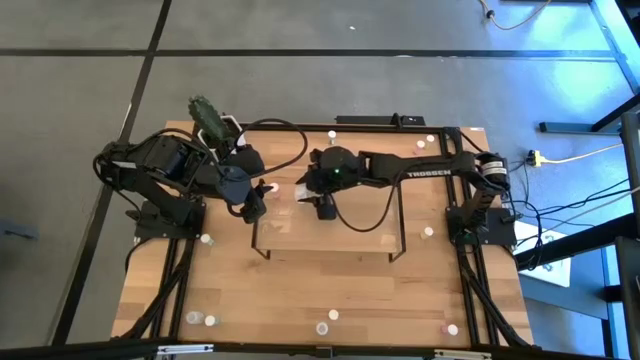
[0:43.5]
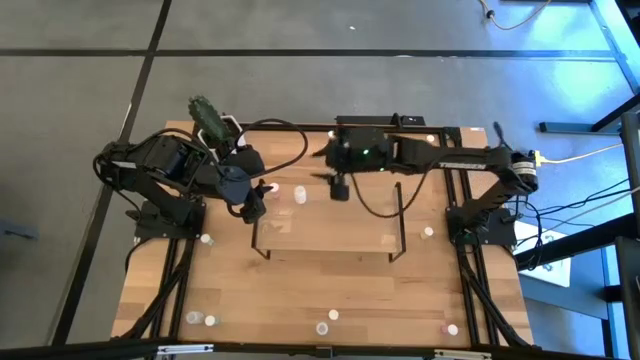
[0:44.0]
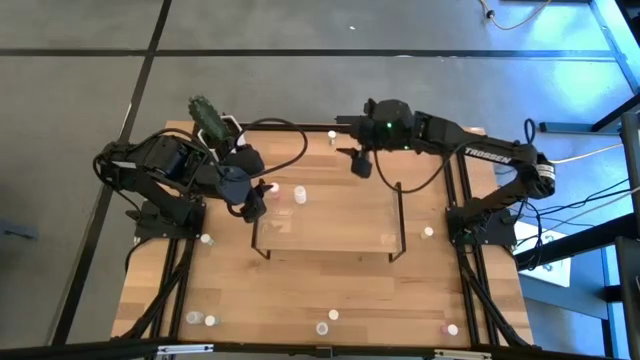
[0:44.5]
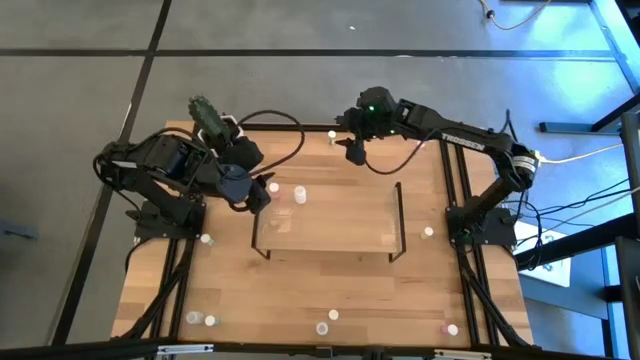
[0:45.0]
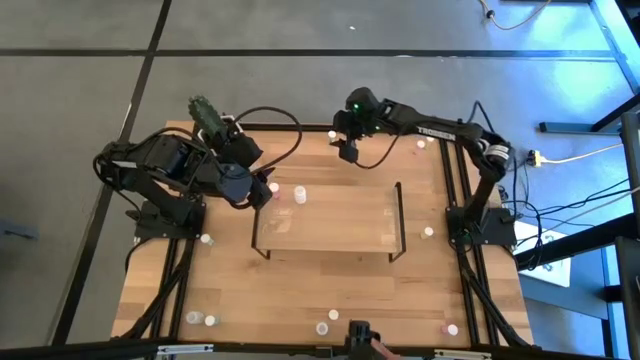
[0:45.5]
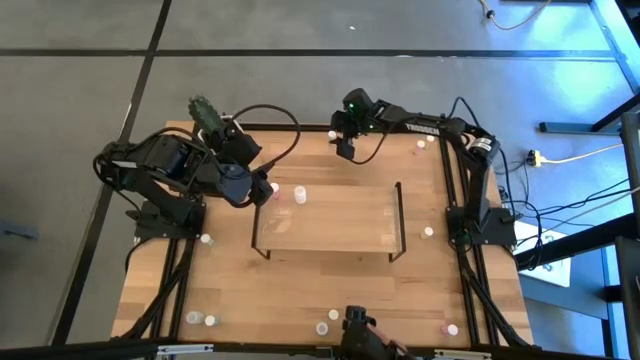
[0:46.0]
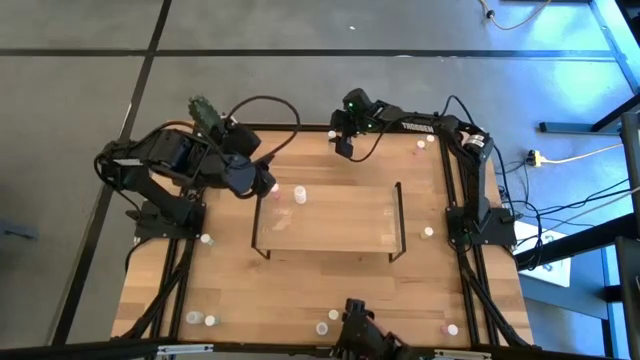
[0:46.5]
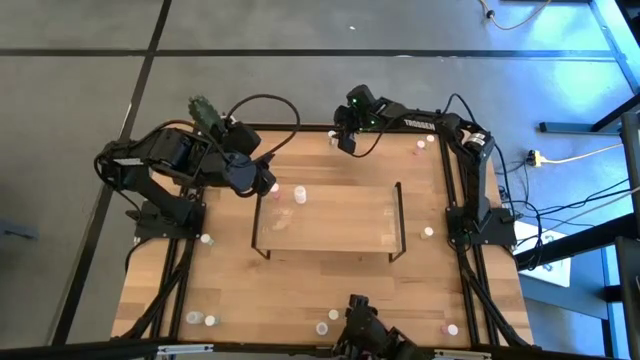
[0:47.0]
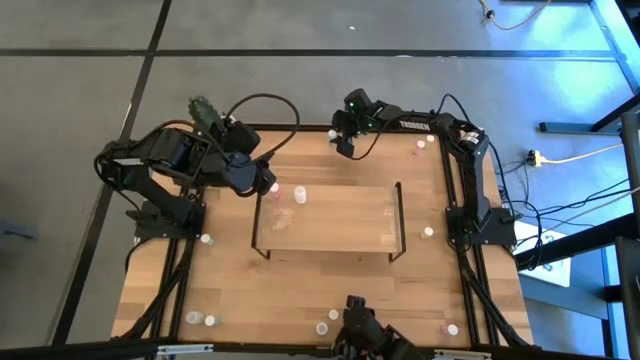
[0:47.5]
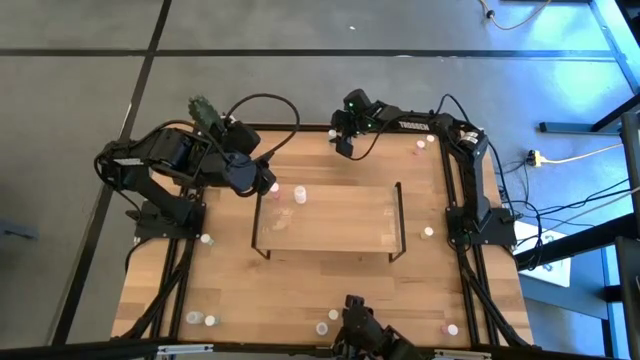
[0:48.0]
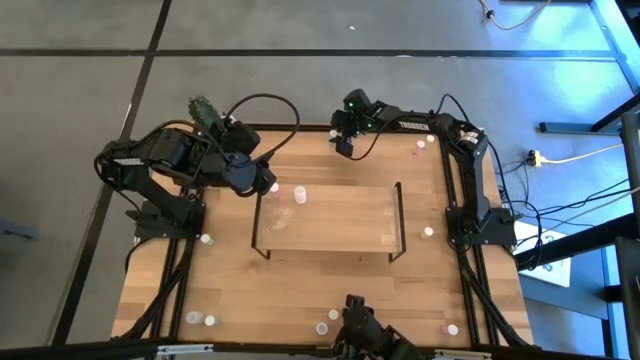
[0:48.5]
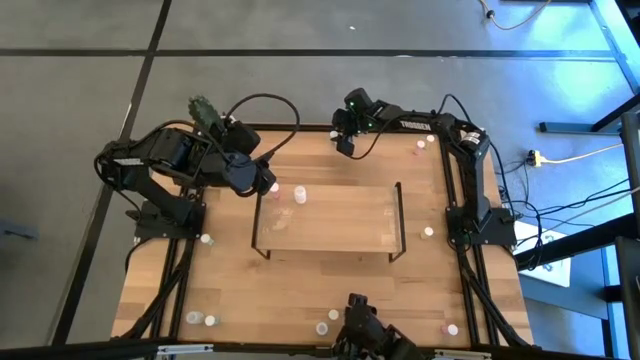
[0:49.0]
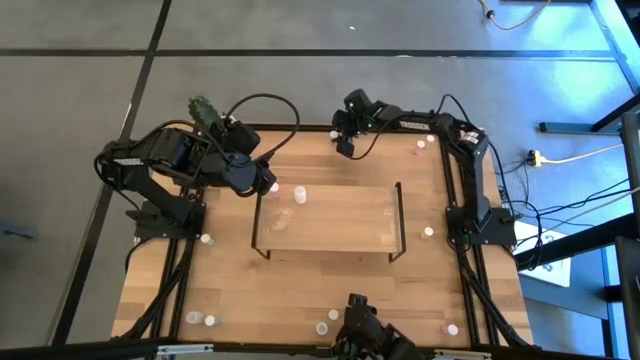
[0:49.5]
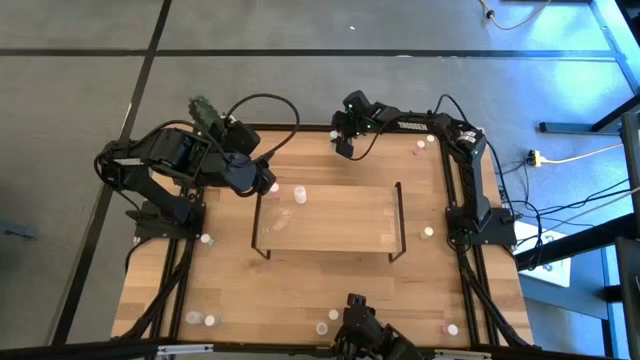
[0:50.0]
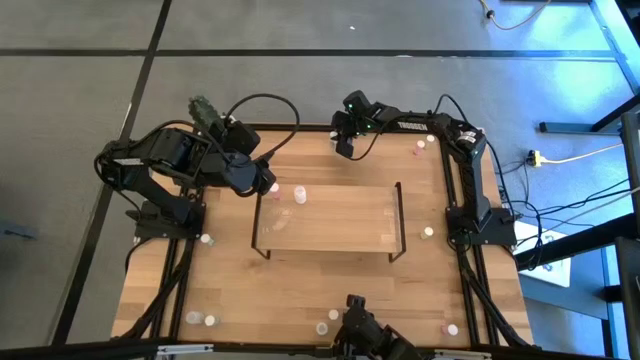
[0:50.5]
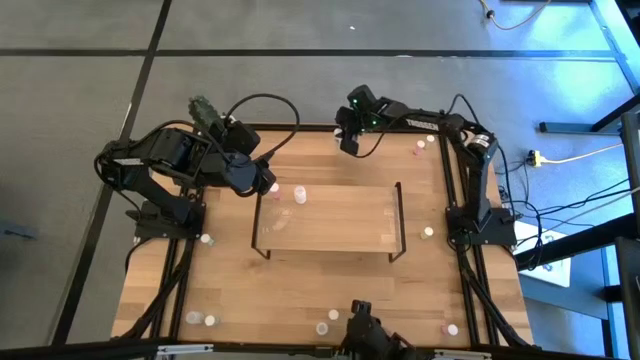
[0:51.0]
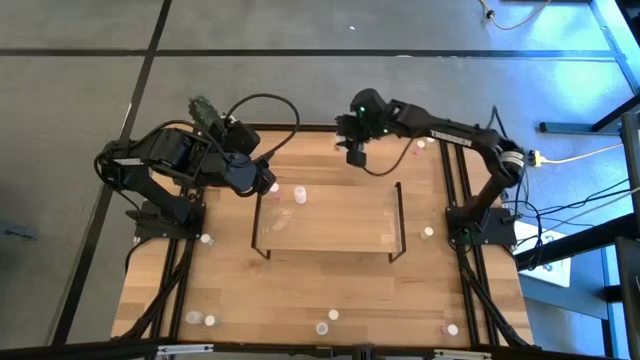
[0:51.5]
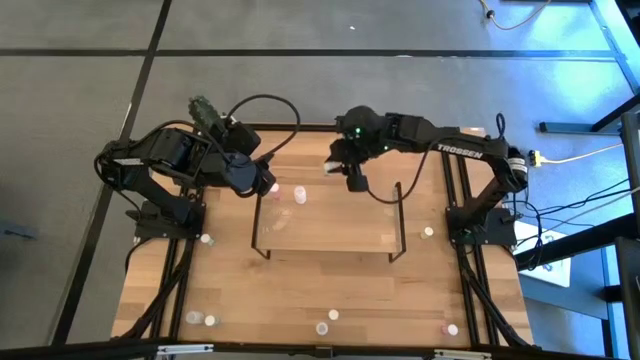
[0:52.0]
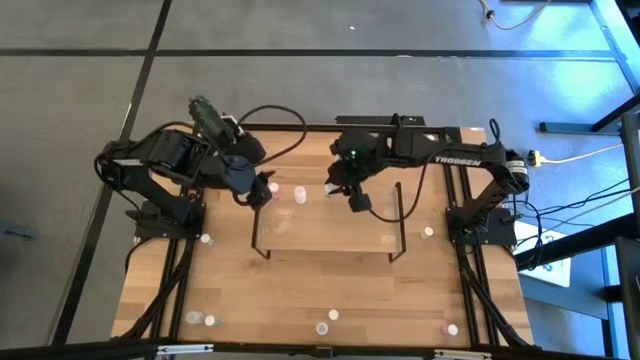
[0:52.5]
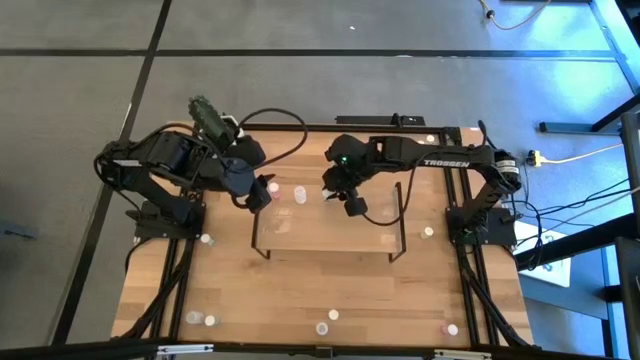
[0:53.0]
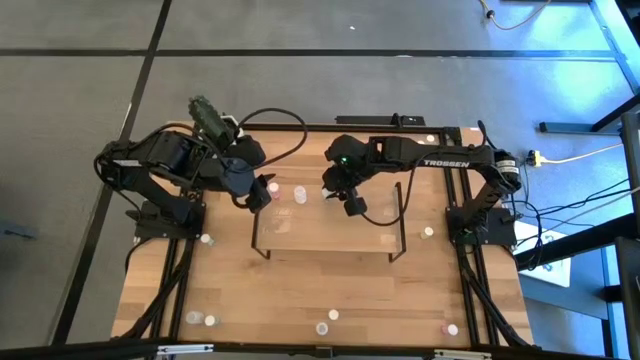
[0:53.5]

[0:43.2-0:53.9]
Task: Pick and place medicine bottles onto shelf by color
Put the top blue pill bottle on the shelf

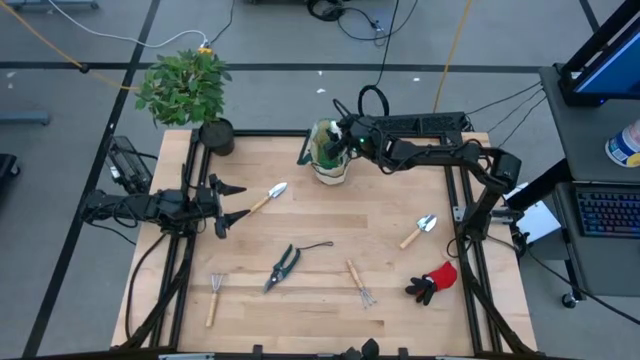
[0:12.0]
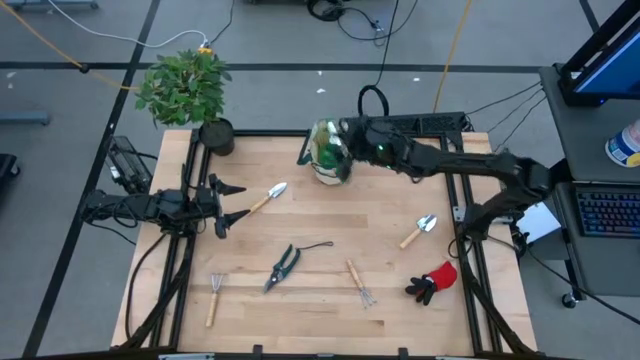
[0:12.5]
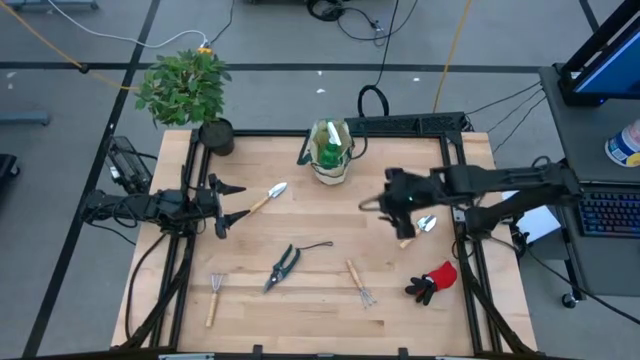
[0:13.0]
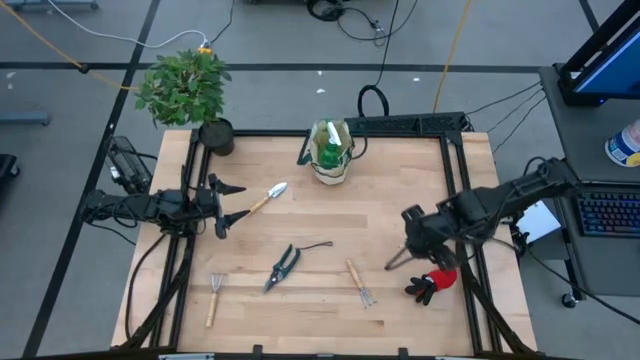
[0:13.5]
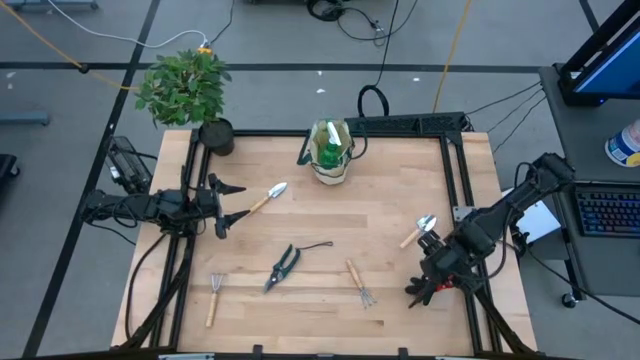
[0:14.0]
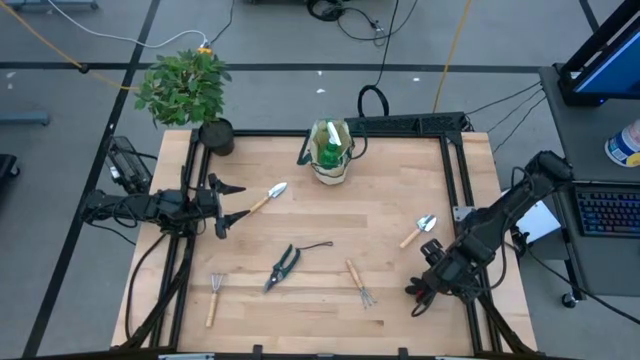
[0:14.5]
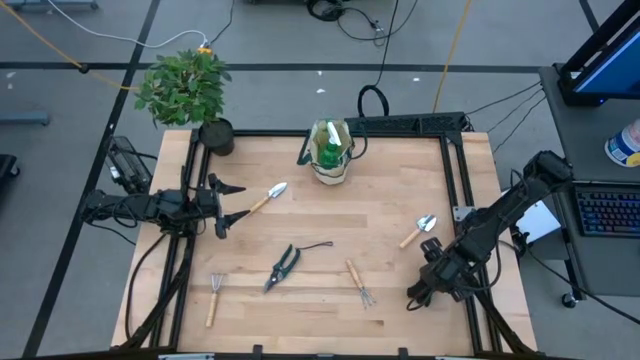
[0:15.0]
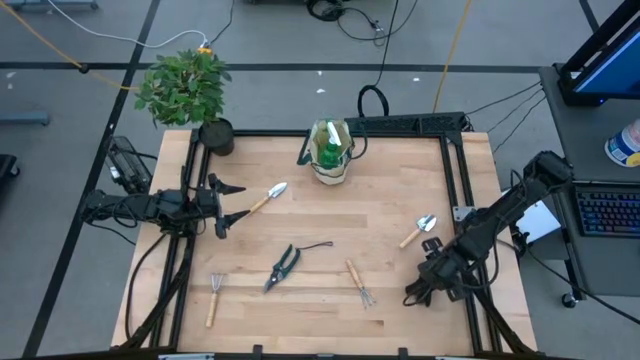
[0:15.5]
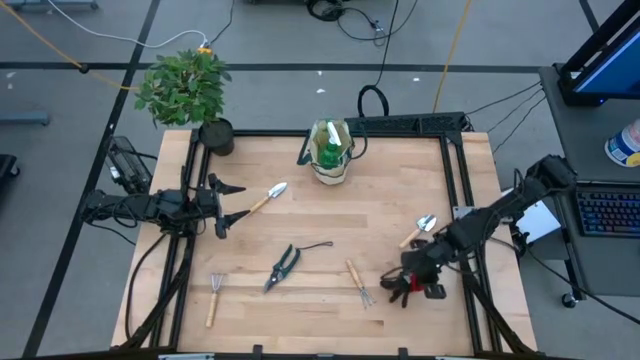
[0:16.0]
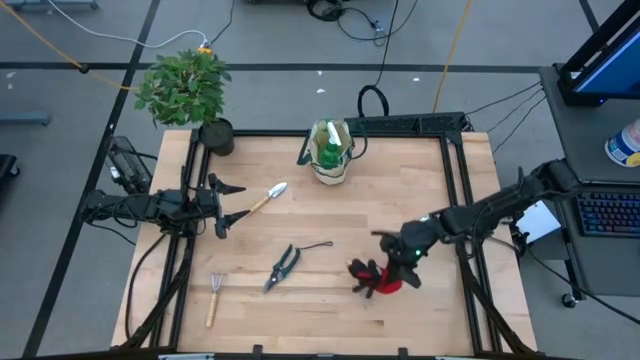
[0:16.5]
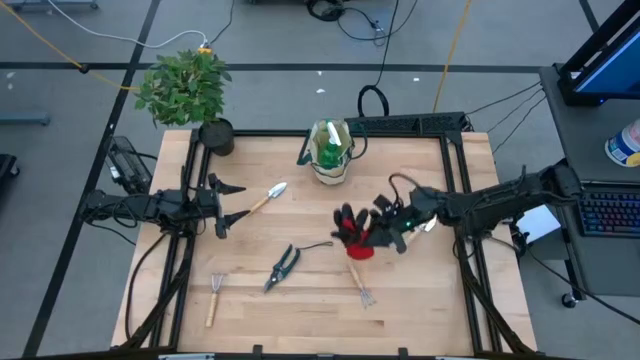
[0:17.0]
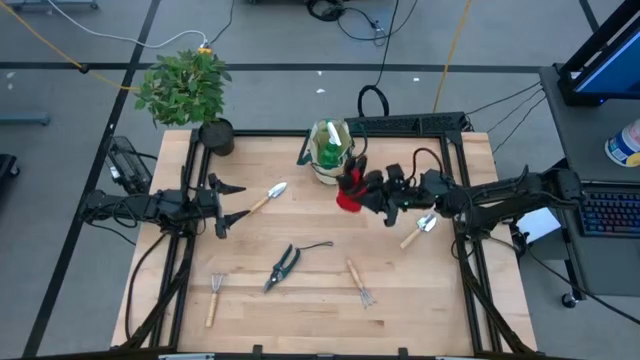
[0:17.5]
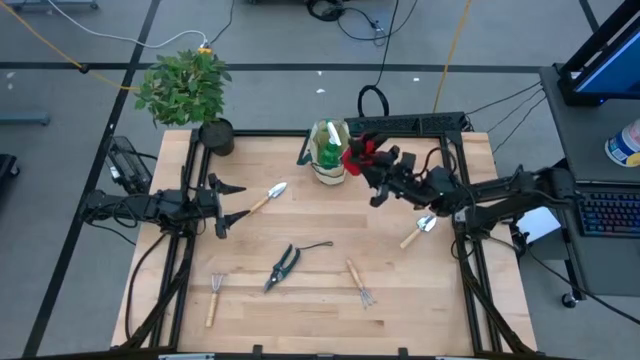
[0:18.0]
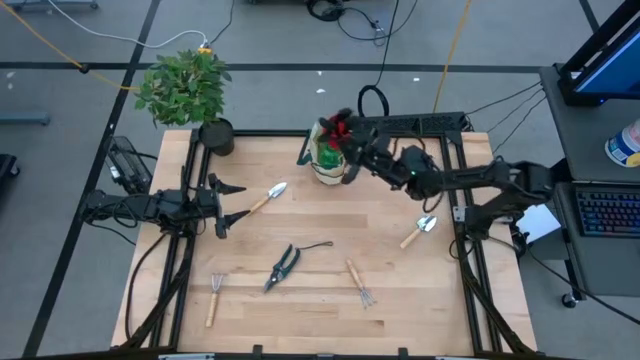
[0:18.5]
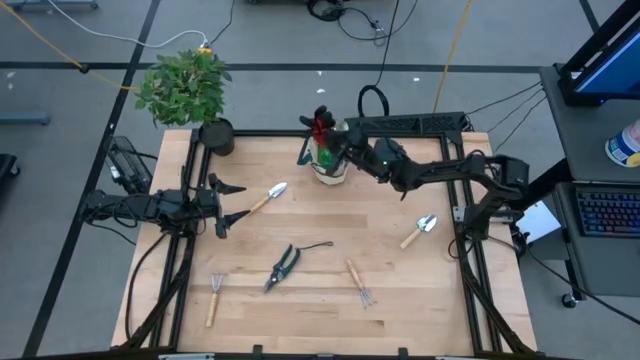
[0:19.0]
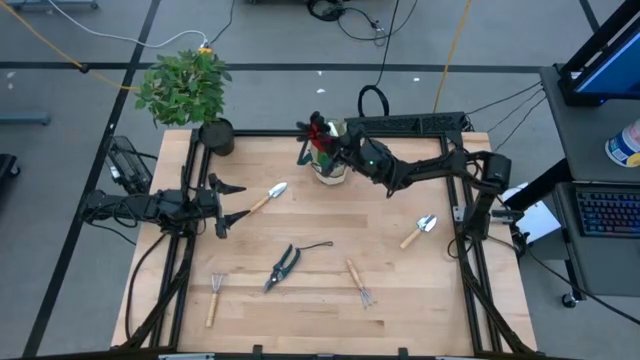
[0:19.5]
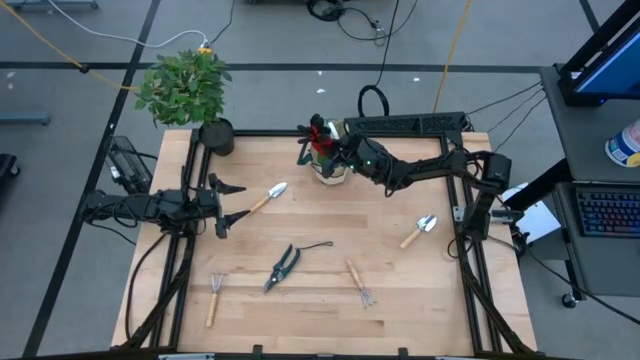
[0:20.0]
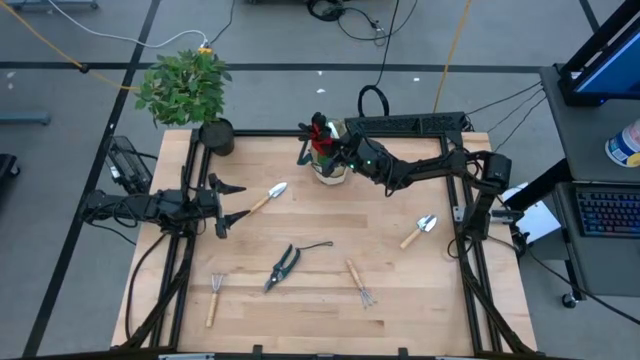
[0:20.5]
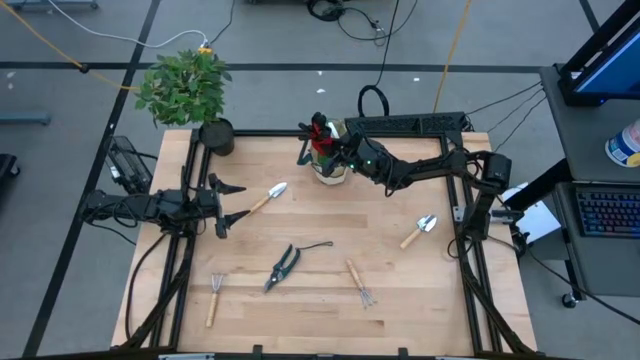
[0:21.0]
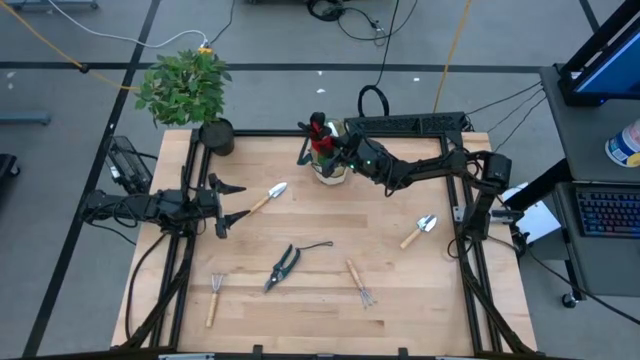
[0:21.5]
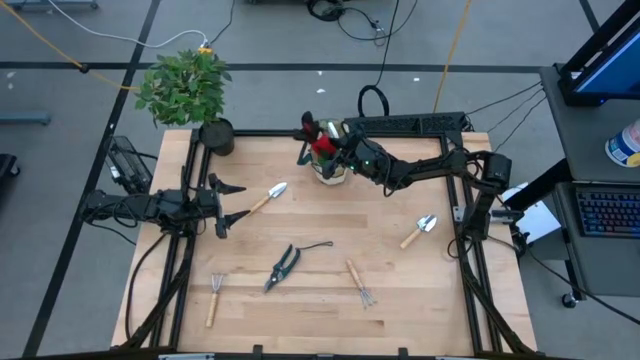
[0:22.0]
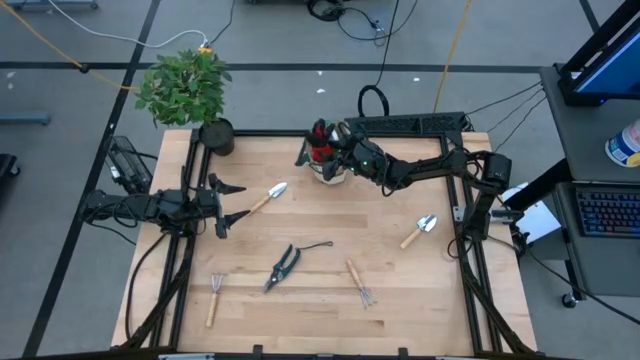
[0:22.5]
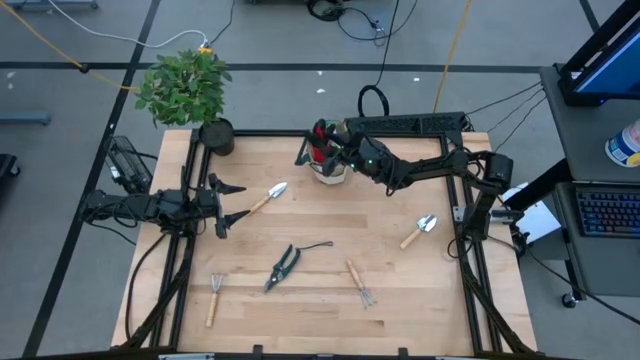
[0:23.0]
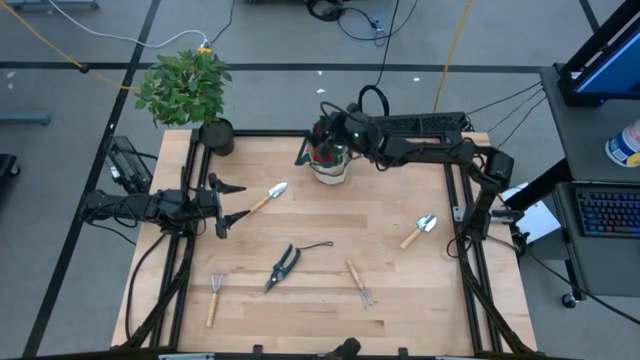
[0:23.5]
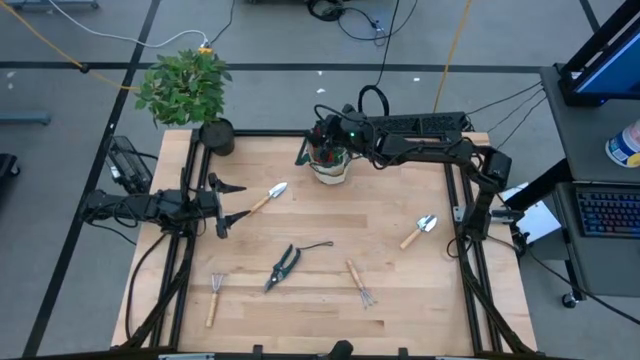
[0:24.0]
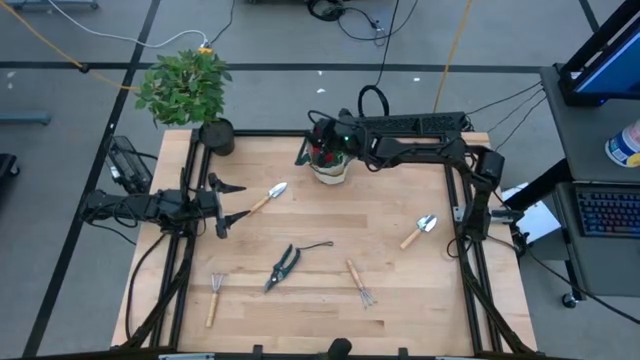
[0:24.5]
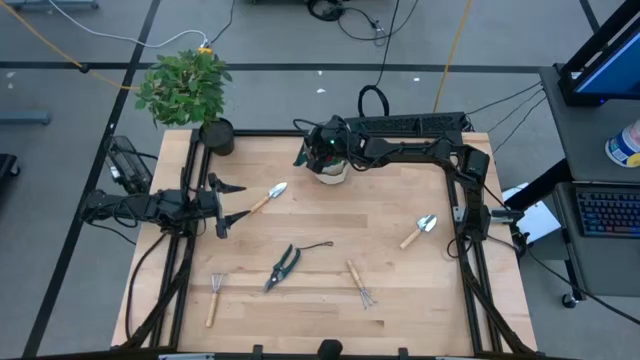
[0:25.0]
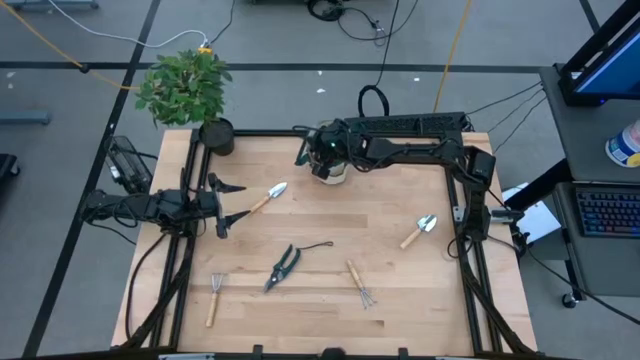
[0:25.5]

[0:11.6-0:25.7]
Task: Pick & Place Garden tools in Gardening bag
Put the red gloves into the brown gardening bag
